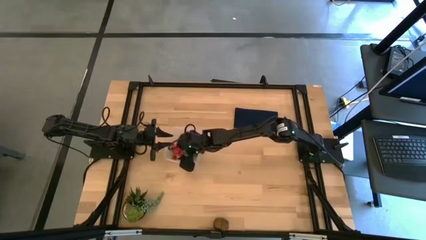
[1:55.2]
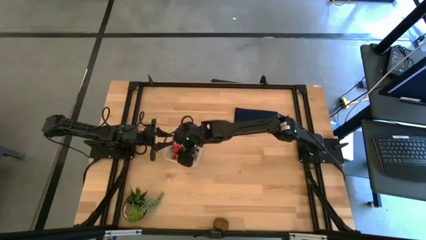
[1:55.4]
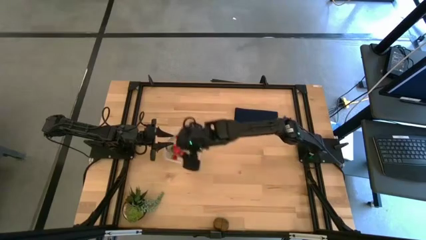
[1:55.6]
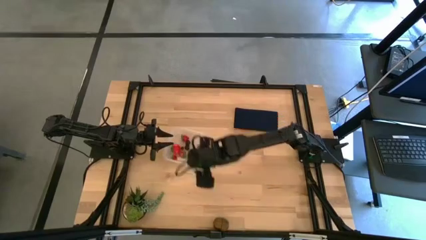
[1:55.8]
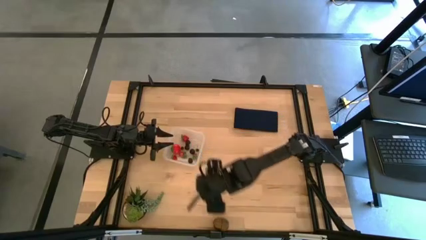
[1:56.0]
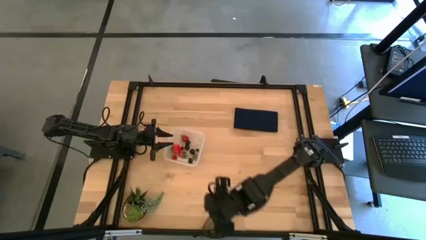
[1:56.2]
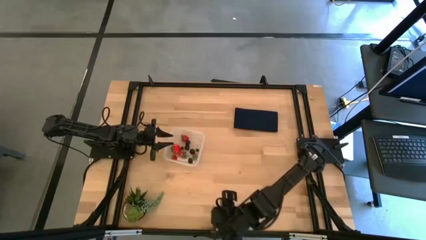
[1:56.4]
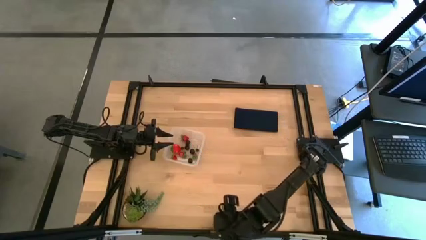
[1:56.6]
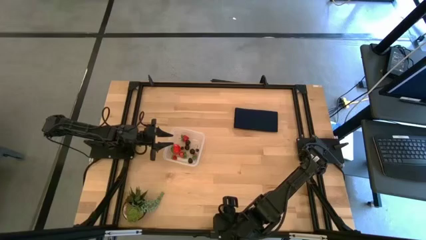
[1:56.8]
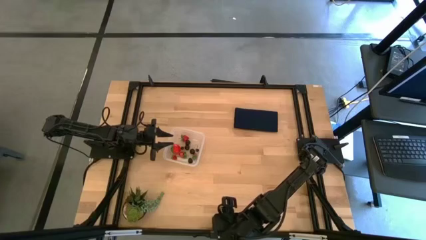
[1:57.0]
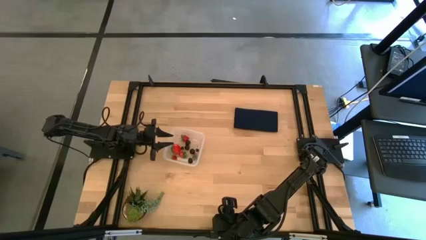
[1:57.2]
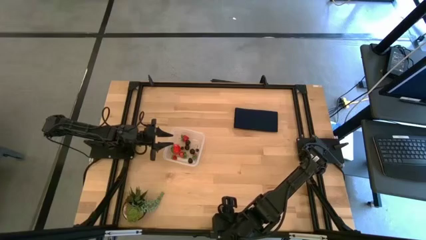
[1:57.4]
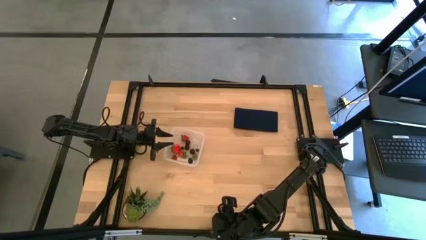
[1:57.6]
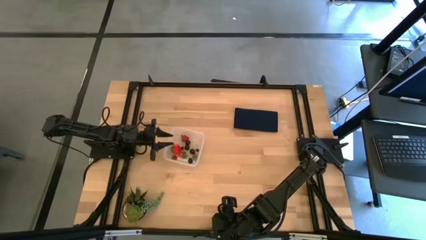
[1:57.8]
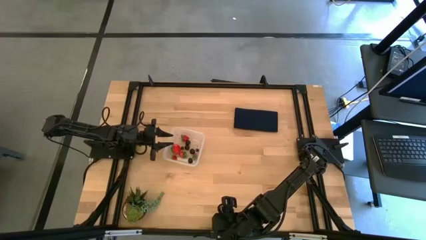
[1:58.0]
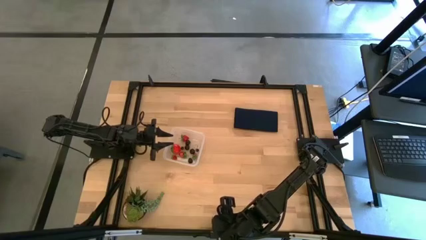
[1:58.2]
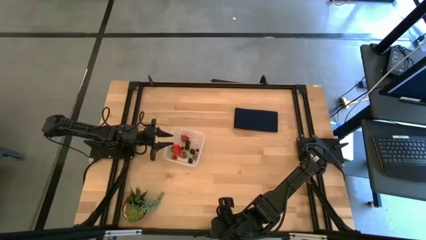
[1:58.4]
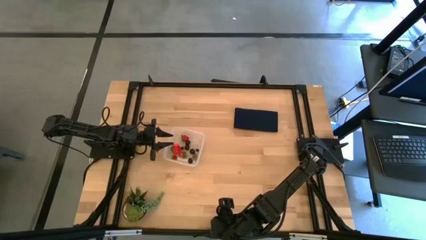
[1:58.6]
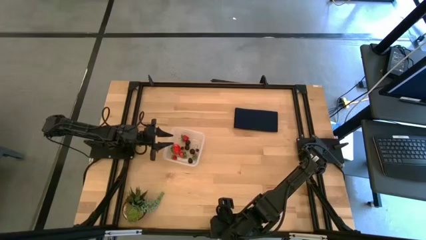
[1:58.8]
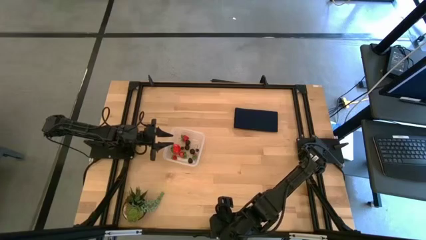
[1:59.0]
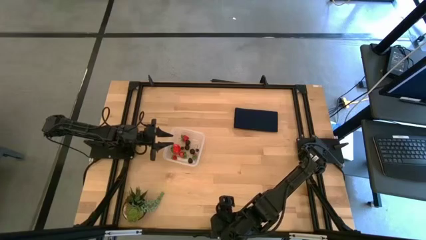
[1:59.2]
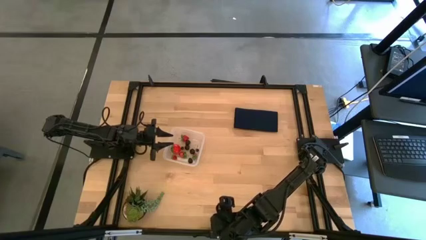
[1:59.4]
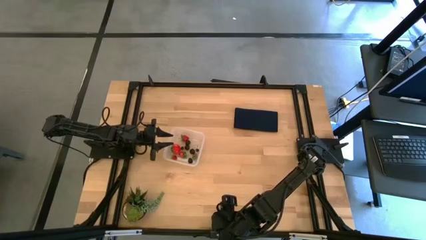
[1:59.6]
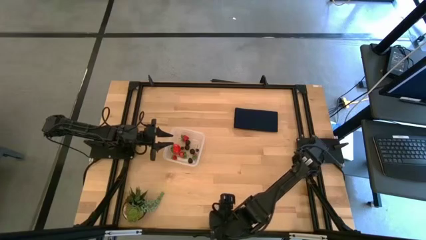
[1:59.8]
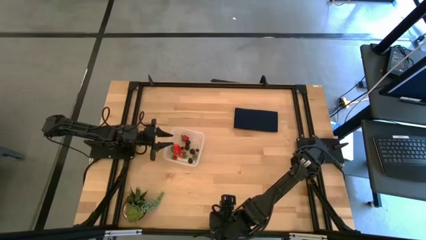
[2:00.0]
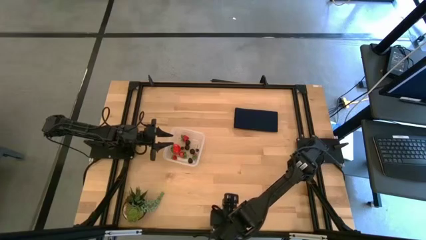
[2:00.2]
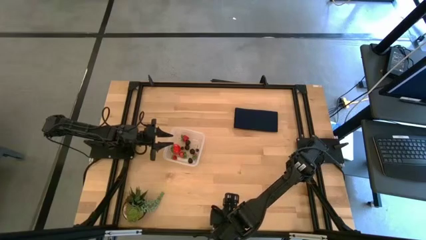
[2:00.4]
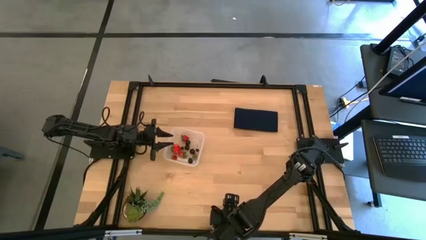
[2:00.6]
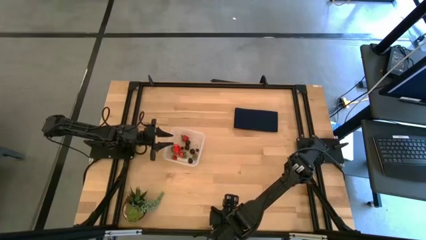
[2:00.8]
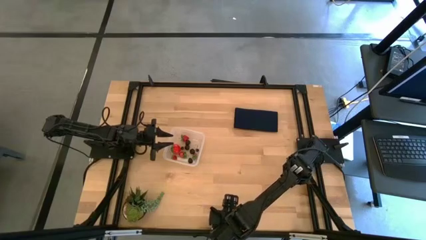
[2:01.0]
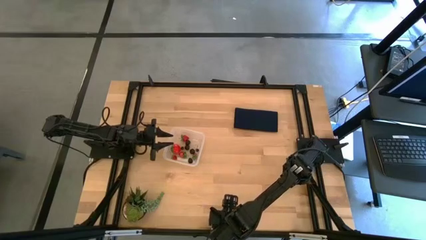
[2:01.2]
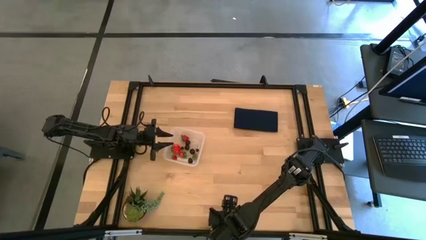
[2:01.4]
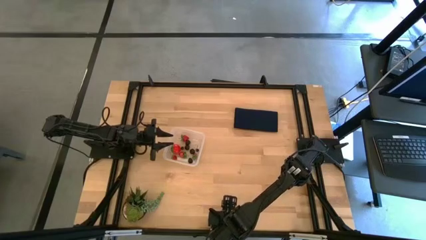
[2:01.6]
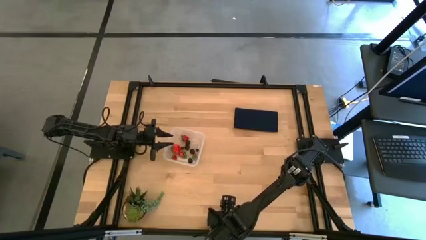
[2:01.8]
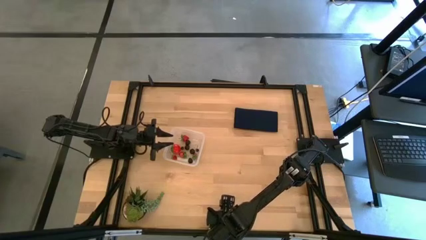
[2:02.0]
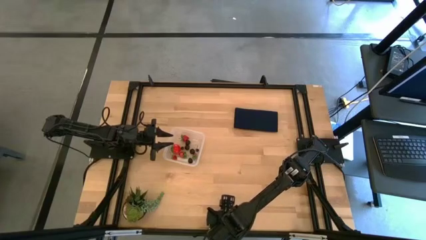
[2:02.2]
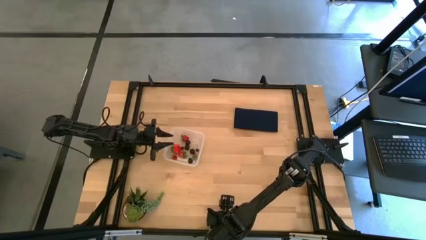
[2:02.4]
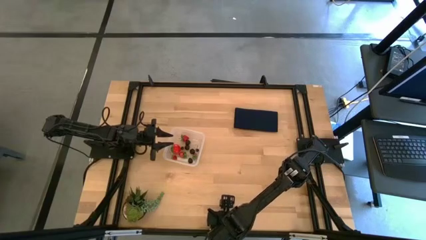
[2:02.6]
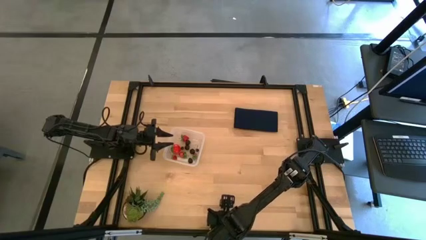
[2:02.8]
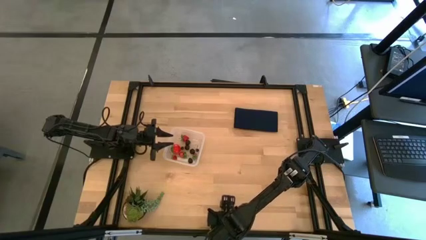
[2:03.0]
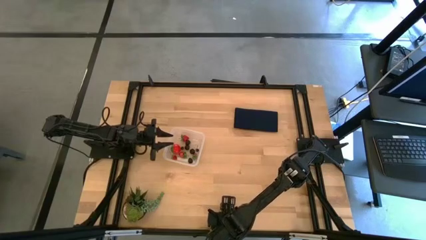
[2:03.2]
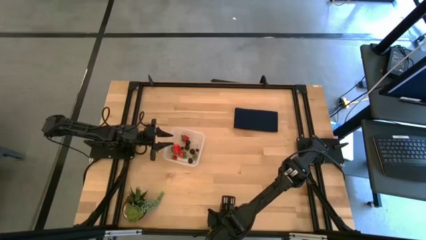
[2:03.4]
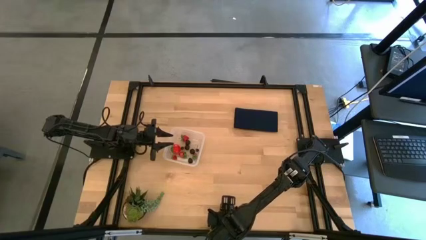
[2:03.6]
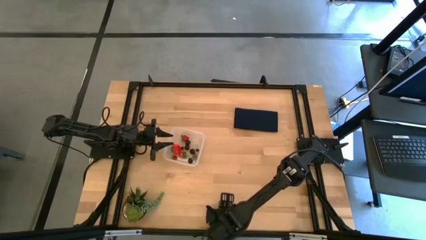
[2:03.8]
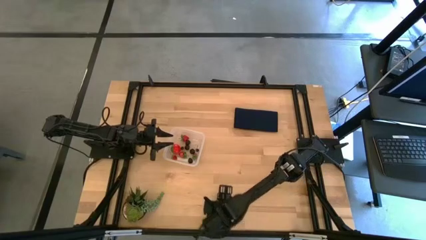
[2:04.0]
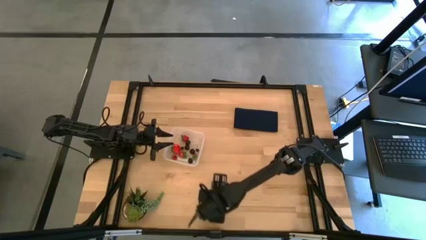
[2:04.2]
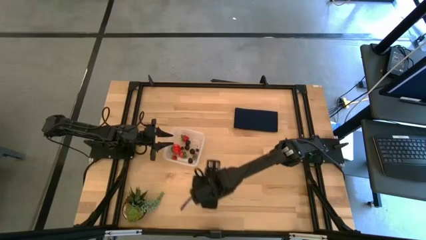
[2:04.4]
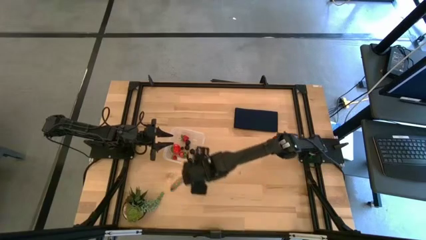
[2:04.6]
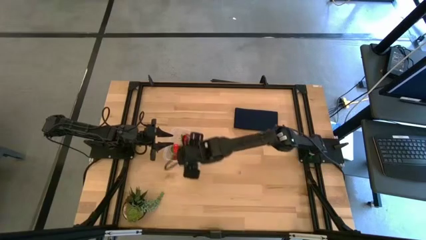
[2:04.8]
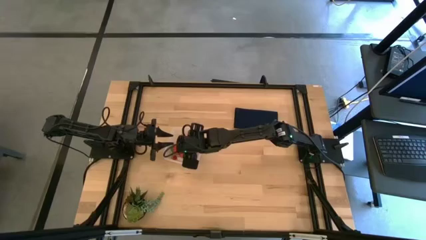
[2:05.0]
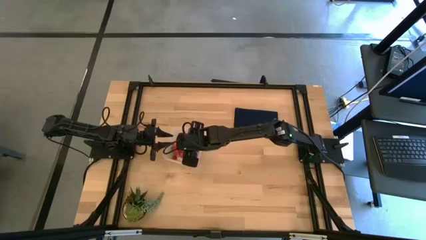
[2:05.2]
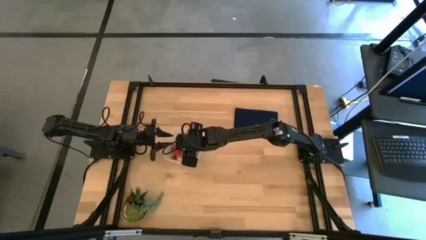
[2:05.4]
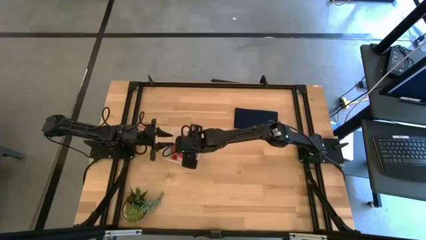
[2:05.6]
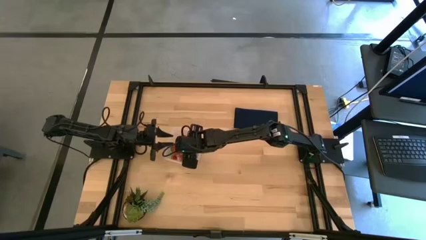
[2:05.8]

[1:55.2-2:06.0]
Task: Pick and placing Produce into tupperware
Put the kiwi into the transparent bin

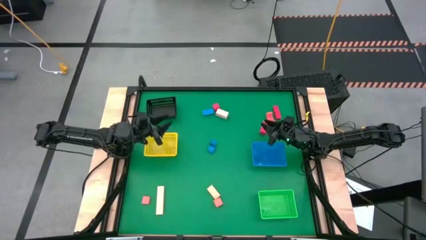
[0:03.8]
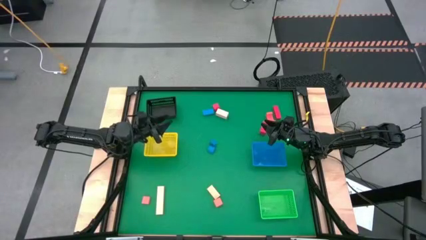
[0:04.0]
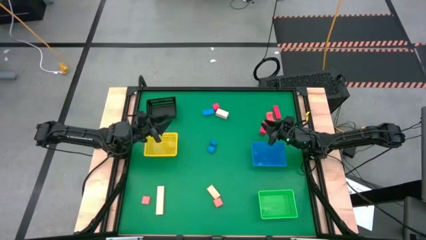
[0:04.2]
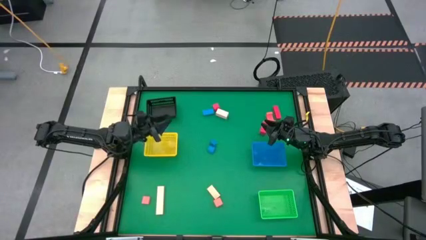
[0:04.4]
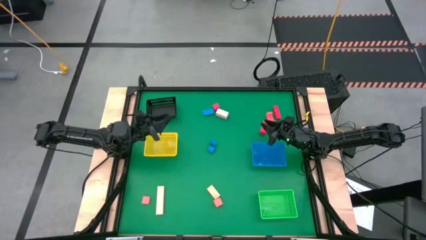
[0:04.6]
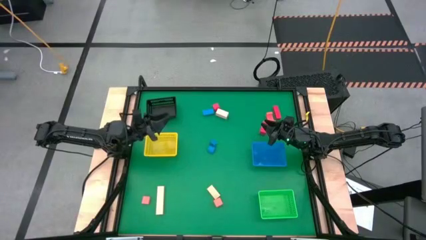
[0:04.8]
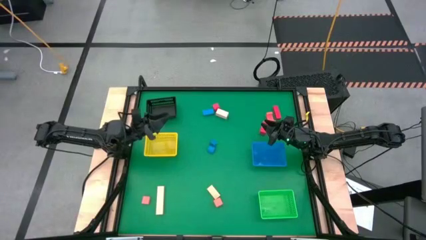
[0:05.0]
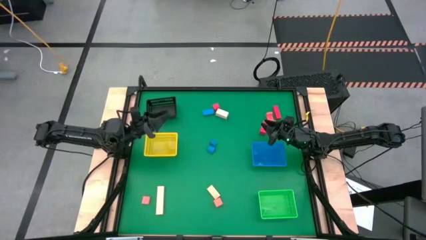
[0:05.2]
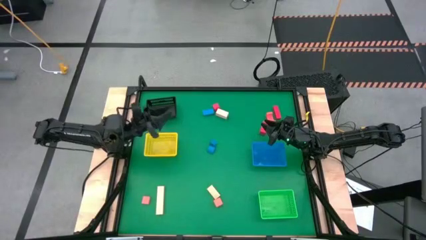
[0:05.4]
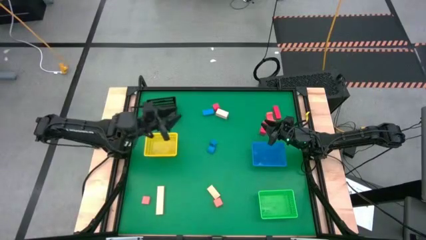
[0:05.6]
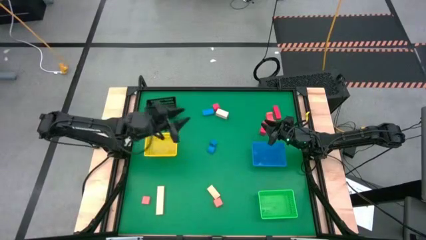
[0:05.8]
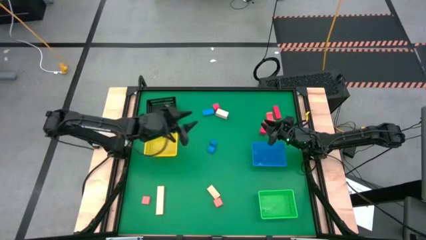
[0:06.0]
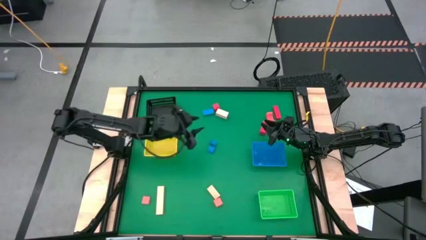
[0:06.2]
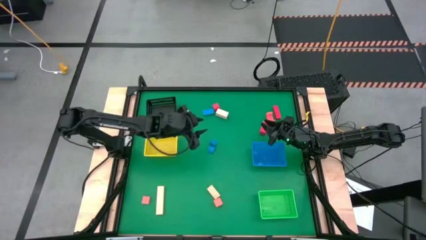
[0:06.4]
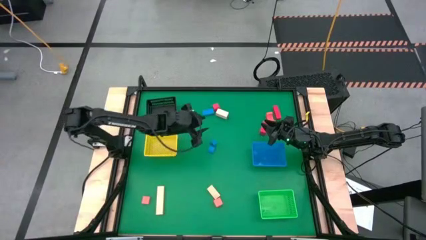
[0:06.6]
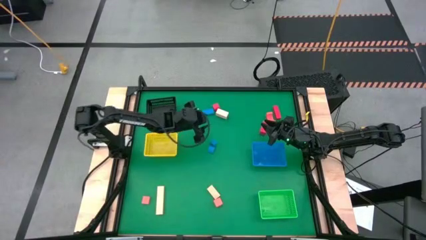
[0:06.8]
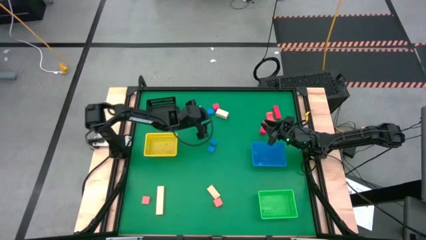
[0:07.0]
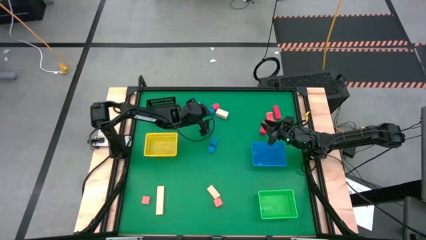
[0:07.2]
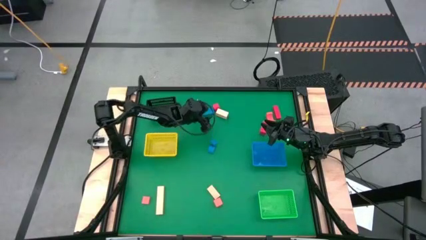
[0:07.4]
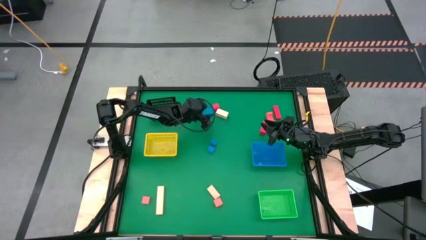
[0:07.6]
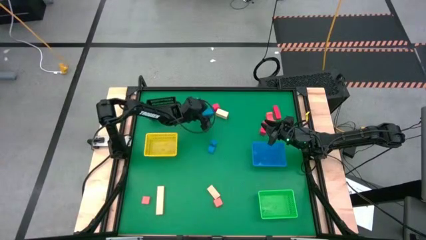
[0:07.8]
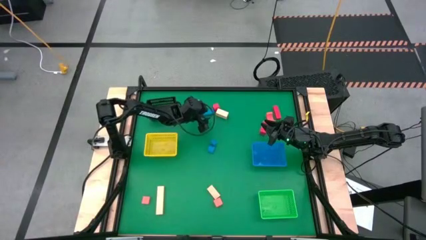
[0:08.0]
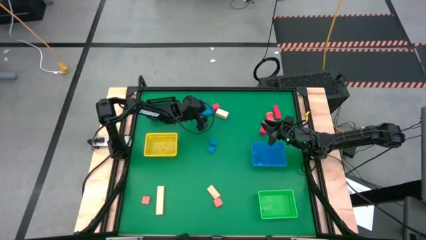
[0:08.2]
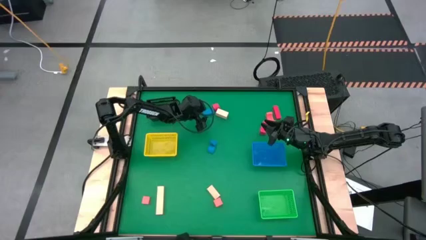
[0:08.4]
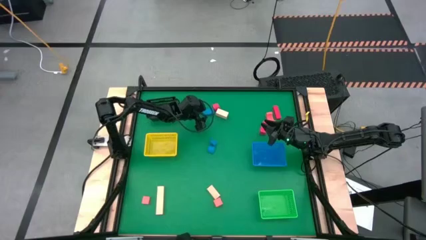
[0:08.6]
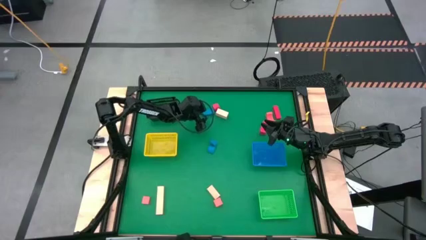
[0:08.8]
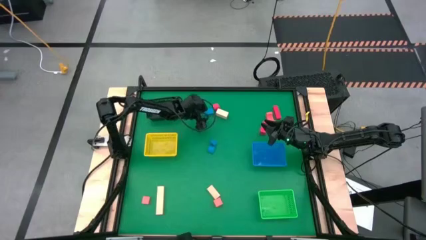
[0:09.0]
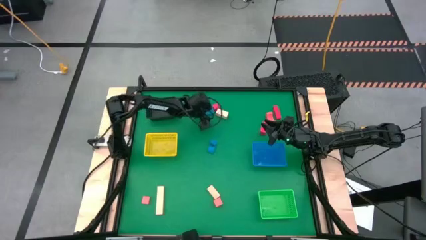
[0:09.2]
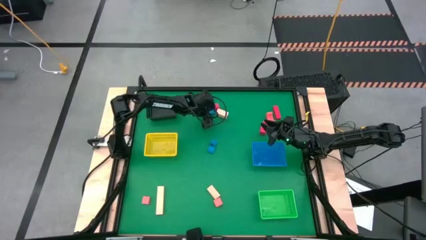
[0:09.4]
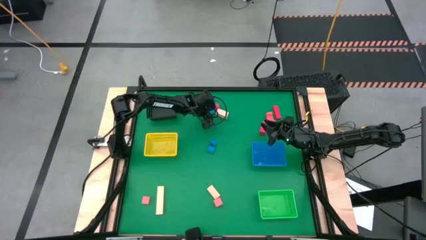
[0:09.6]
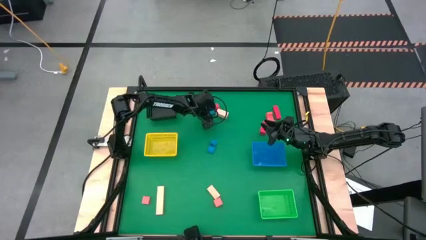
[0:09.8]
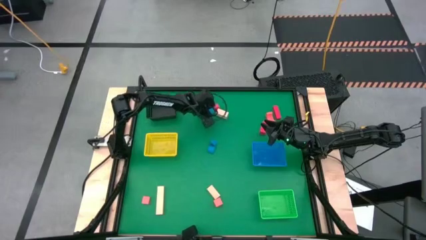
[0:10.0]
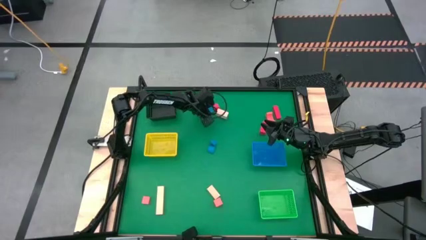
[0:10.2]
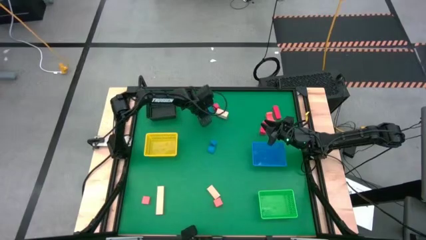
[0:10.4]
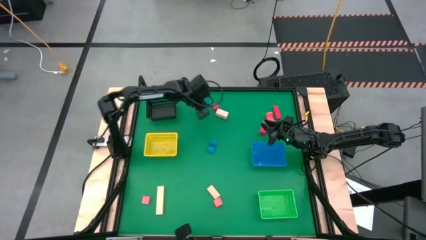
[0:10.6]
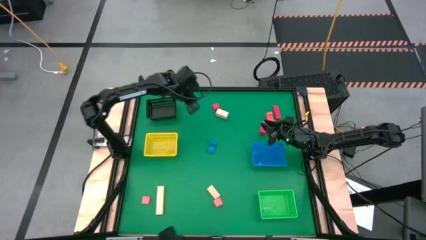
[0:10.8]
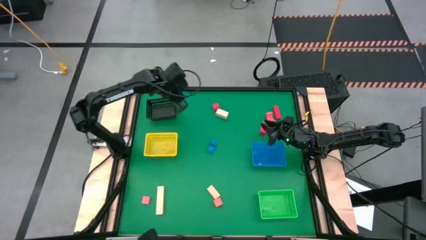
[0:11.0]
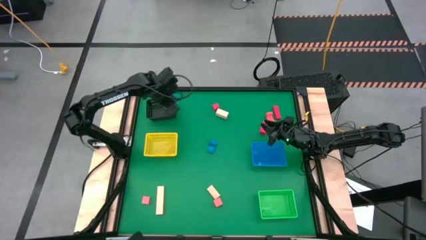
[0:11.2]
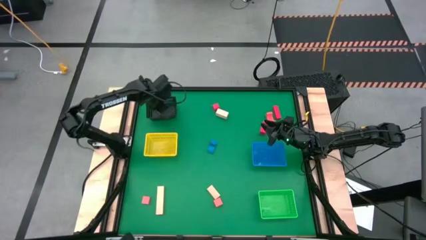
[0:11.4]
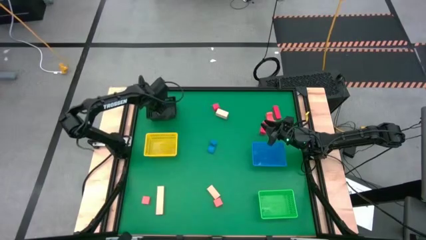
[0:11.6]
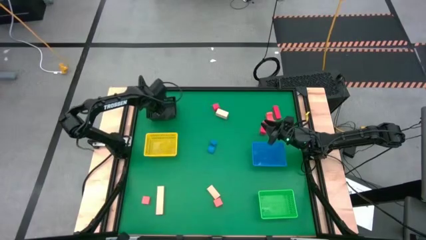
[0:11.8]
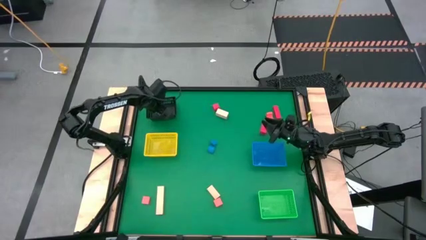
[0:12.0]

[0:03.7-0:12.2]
Task: Sort & place blocks by color
Put the top blue block into the black bin
